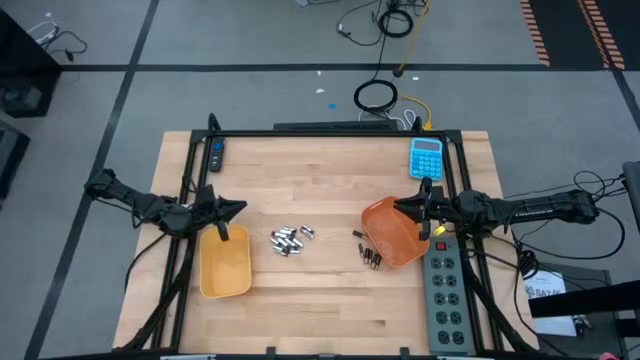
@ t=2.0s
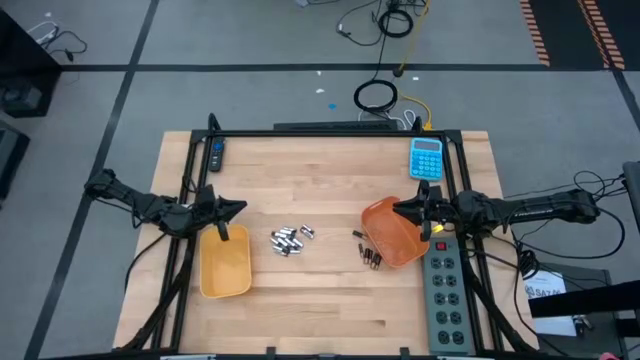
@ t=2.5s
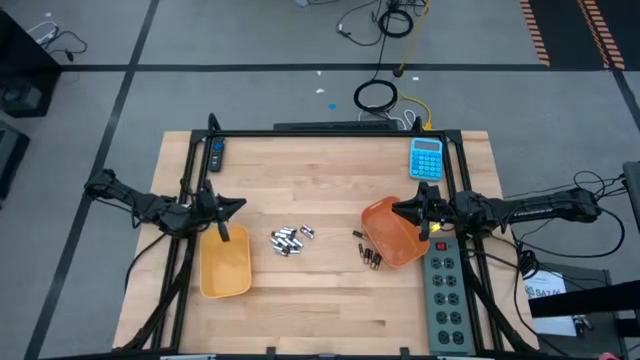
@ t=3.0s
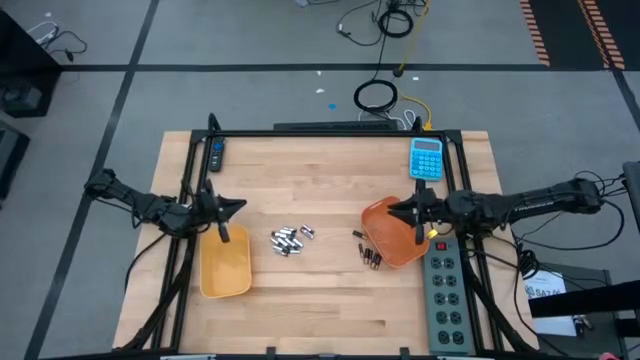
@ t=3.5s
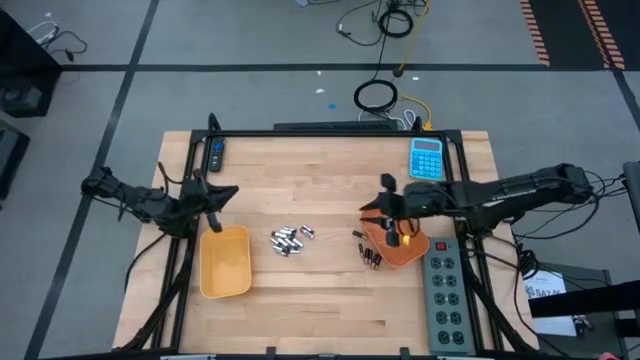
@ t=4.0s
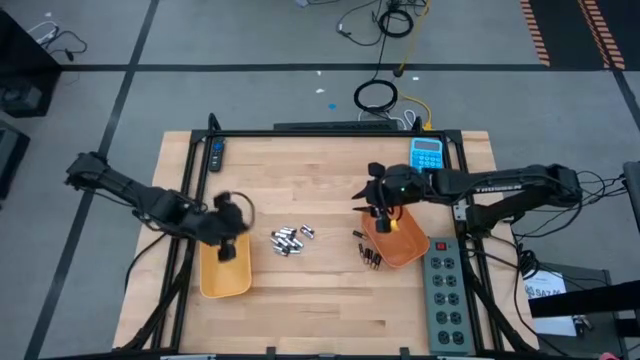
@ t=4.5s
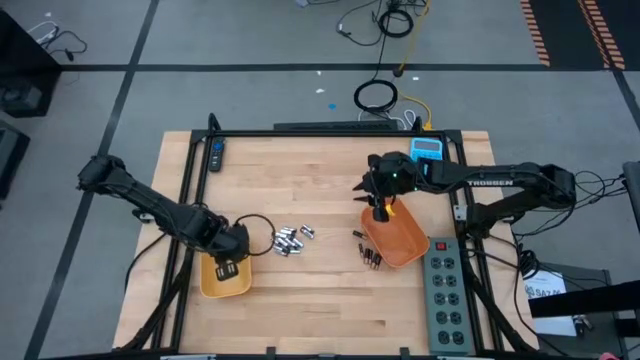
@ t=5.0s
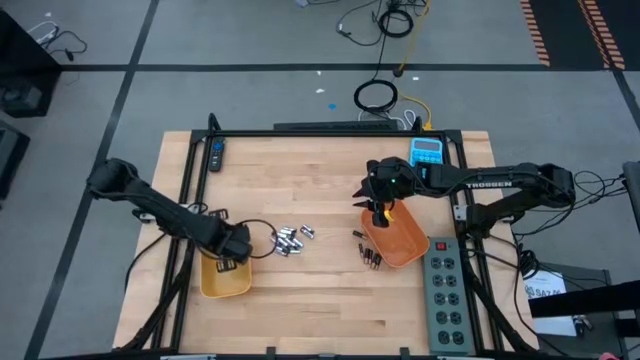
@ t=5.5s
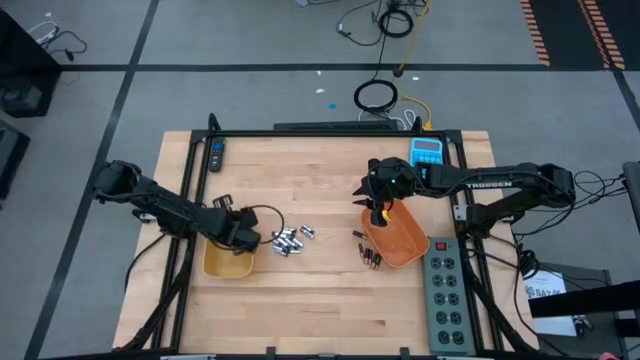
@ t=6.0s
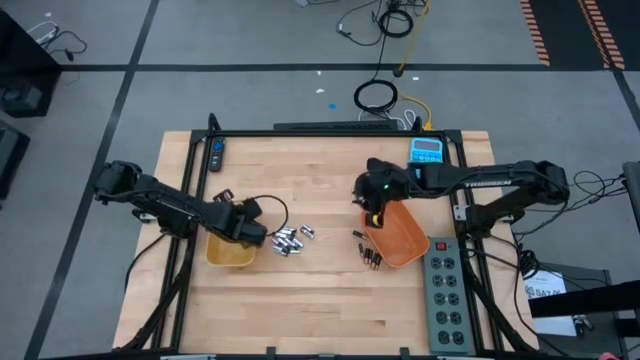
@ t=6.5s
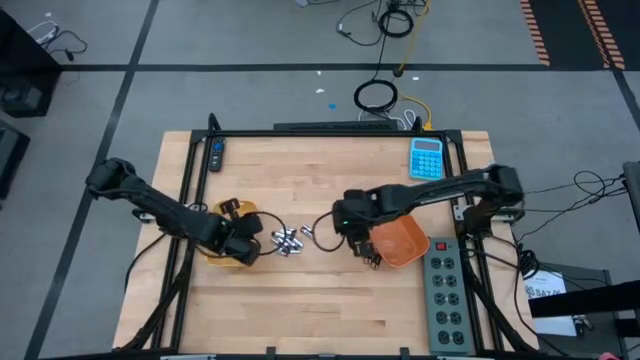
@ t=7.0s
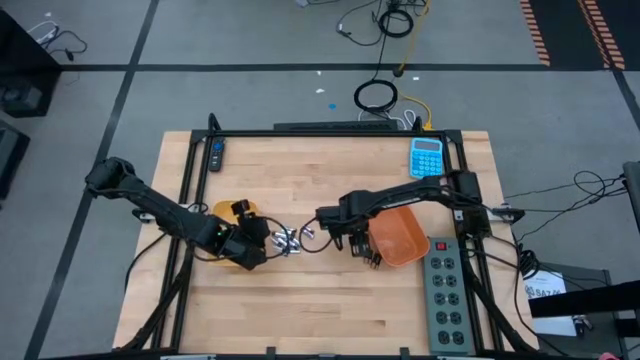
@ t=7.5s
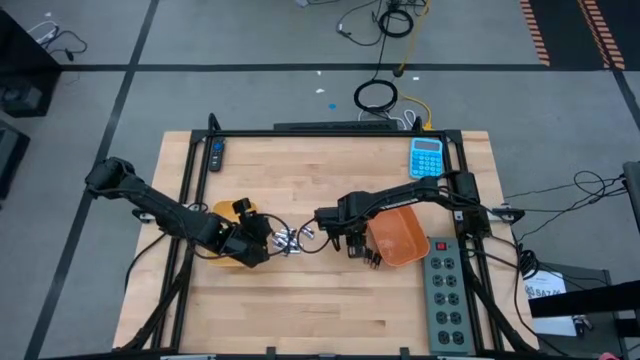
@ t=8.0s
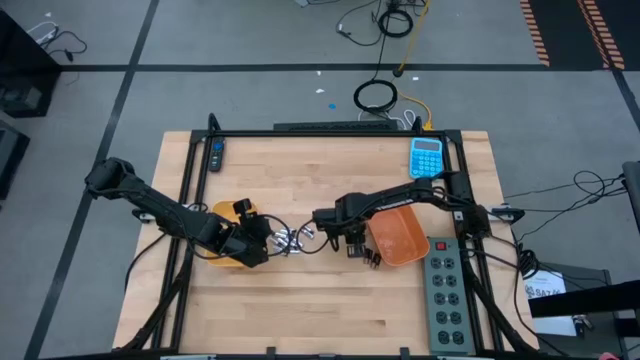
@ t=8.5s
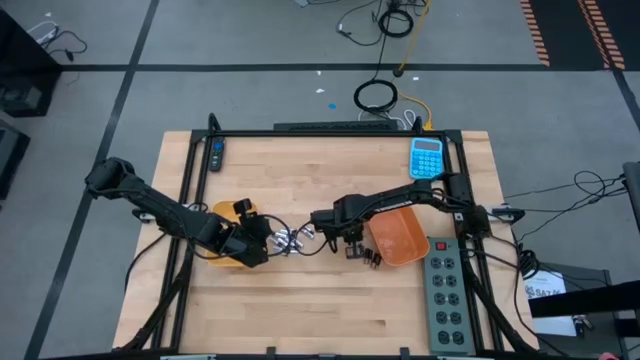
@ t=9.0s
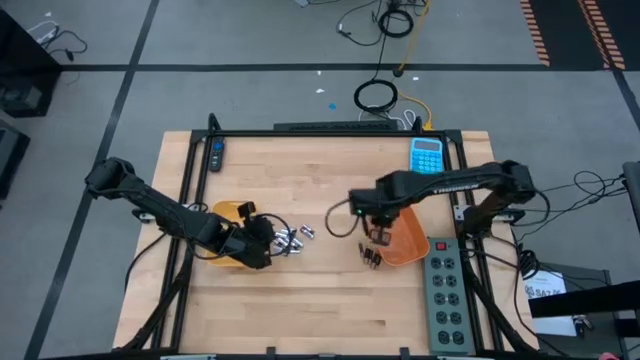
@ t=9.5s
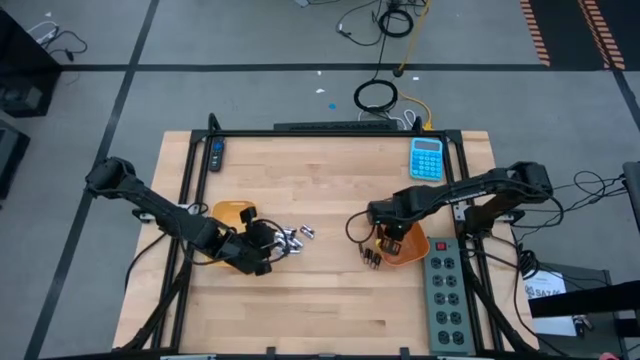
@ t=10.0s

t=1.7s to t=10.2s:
Task: Sort batteries
Put the brown battery into the orange bin

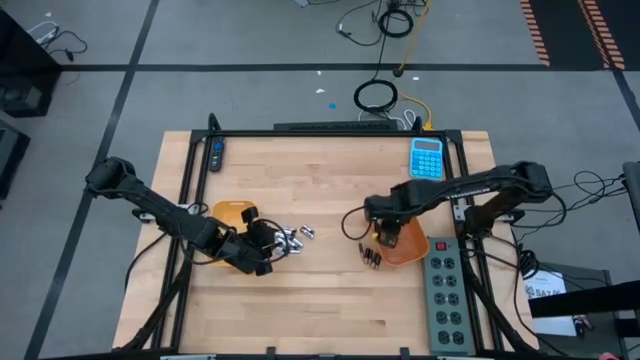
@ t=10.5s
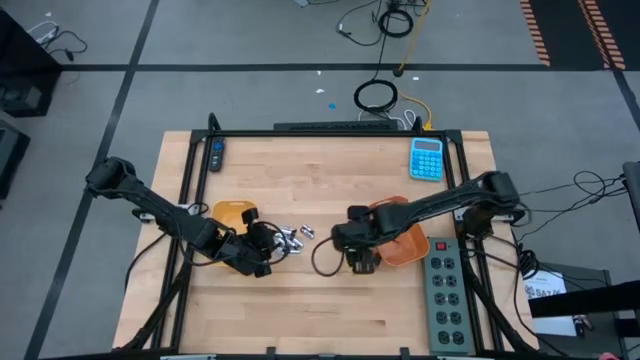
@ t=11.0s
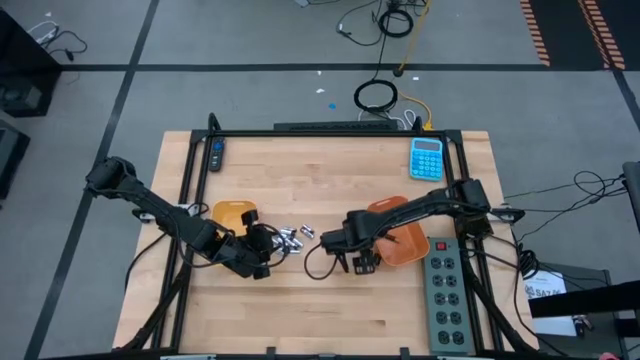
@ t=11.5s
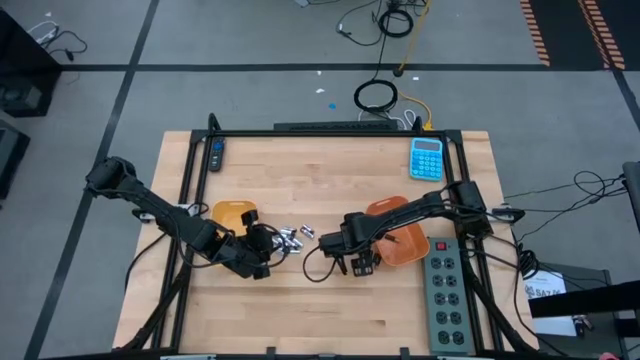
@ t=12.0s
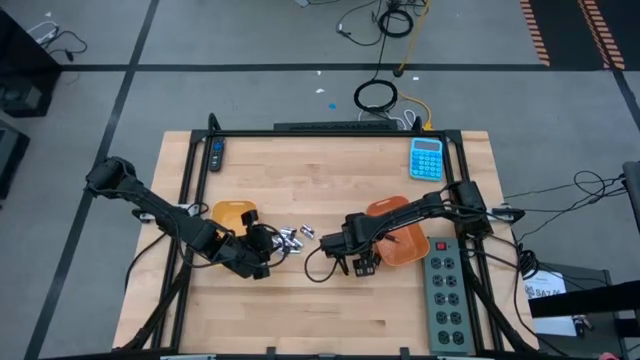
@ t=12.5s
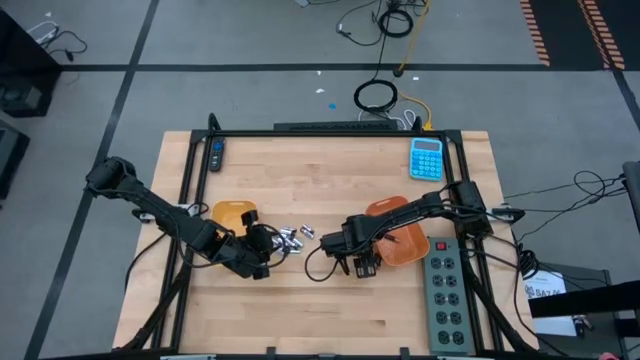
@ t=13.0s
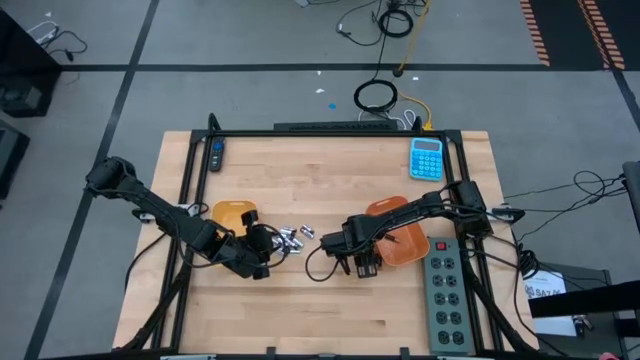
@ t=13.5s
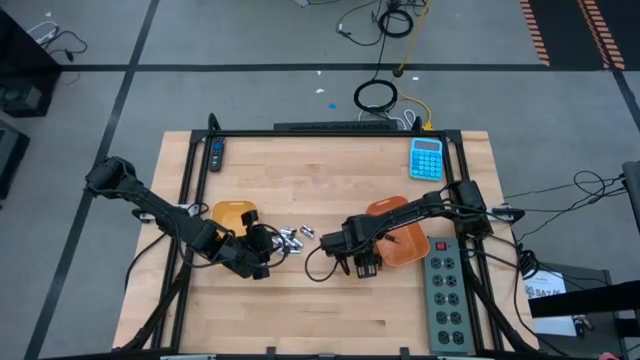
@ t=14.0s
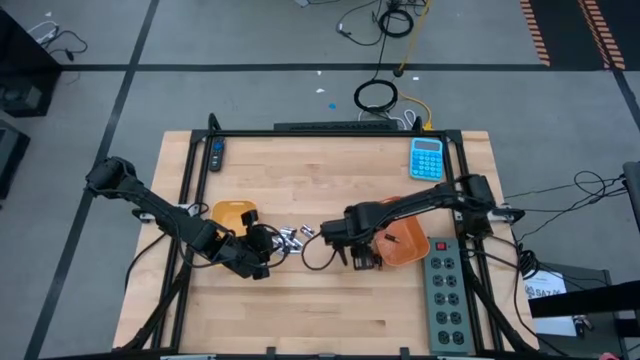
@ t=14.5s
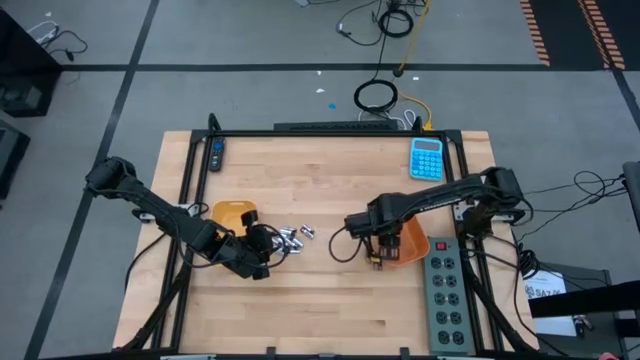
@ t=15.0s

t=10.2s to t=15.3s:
Put the brown battery into the orange bin

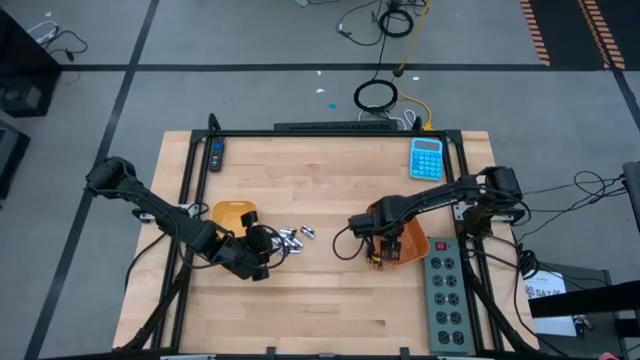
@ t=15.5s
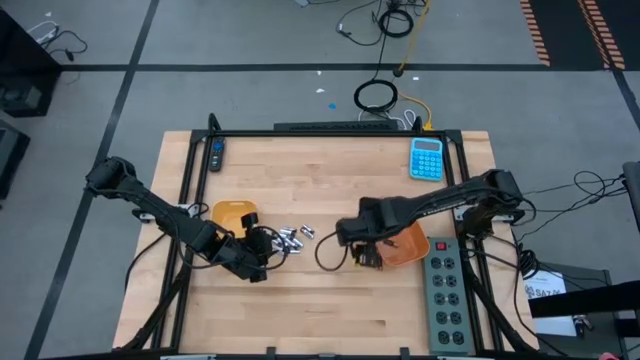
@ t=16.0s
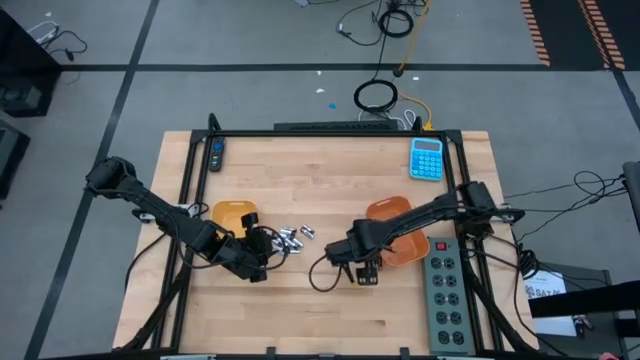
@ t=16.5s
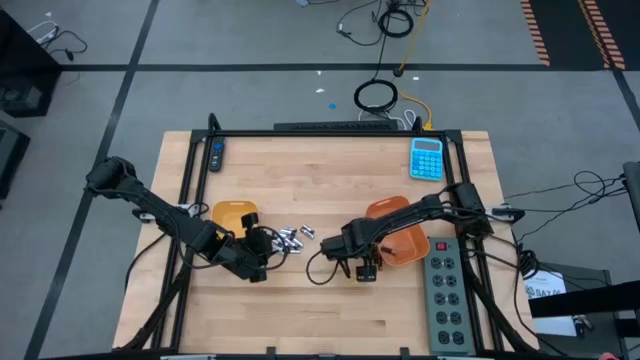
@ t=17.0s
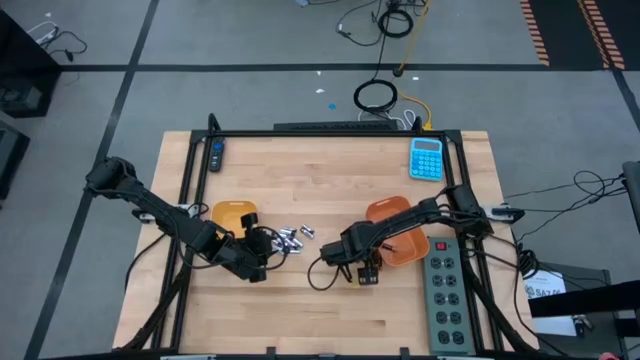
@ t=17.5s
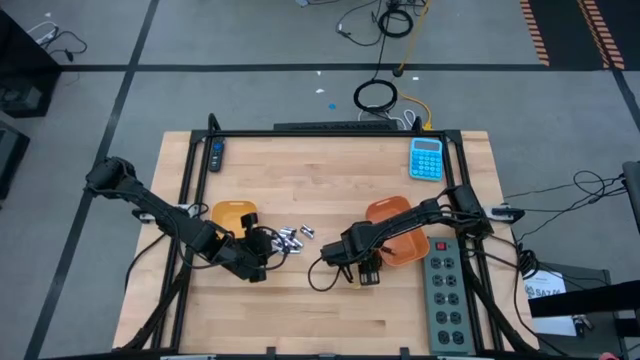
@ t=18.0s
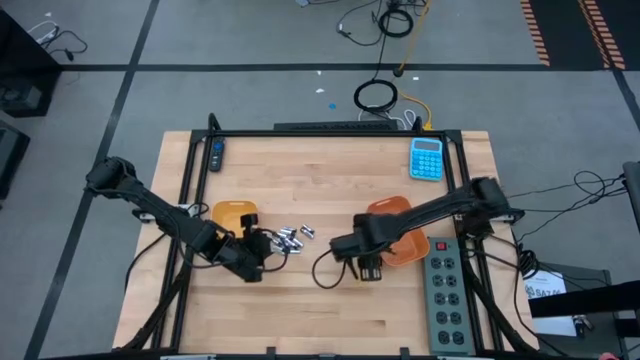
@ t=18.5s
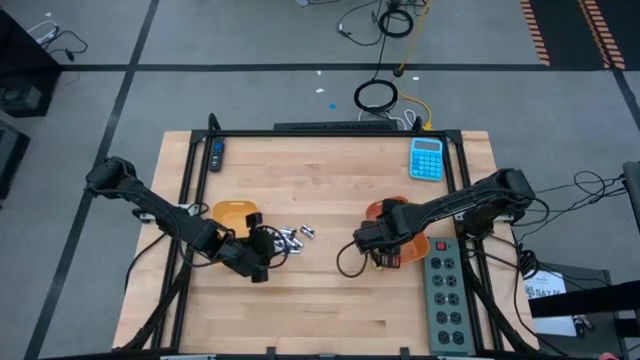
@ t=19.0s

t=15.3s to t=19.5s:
Put the brown battery into the orange bin

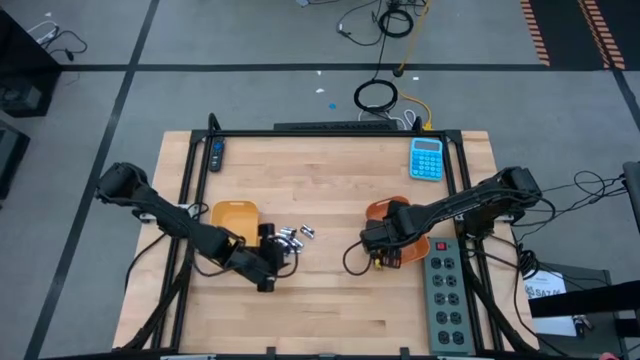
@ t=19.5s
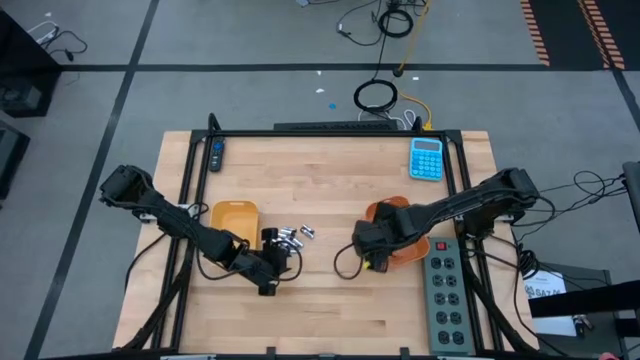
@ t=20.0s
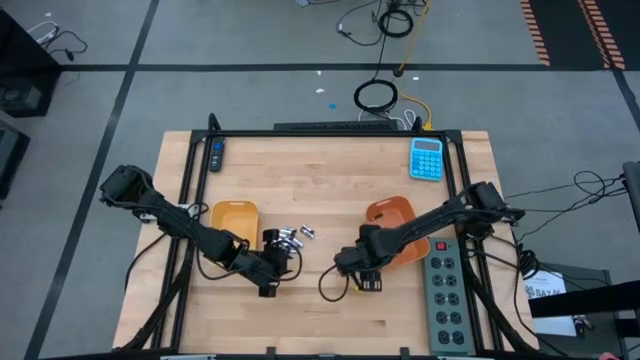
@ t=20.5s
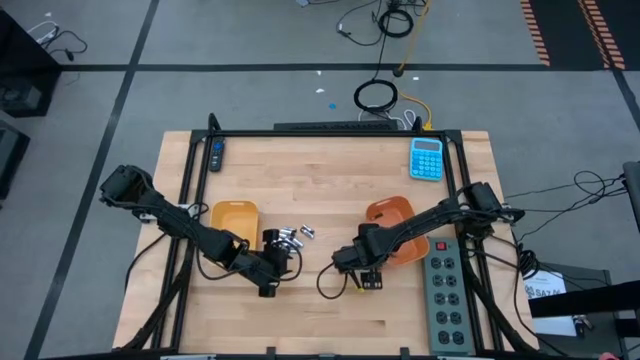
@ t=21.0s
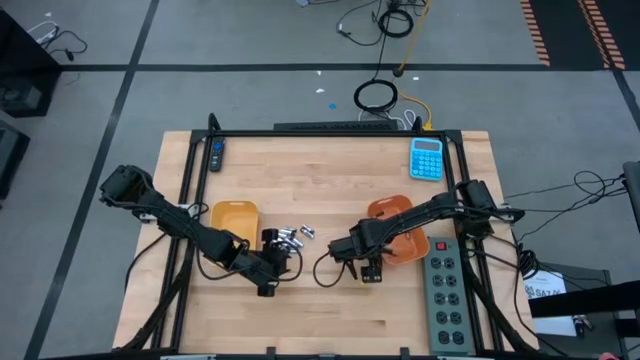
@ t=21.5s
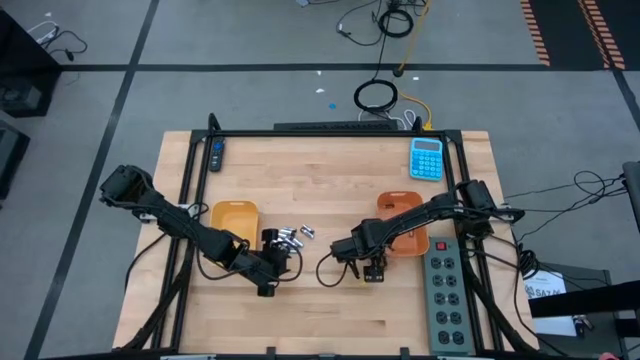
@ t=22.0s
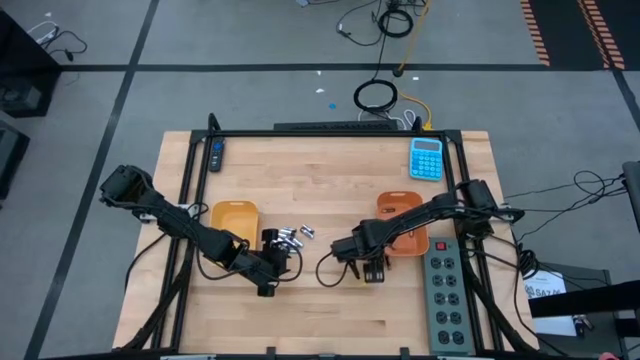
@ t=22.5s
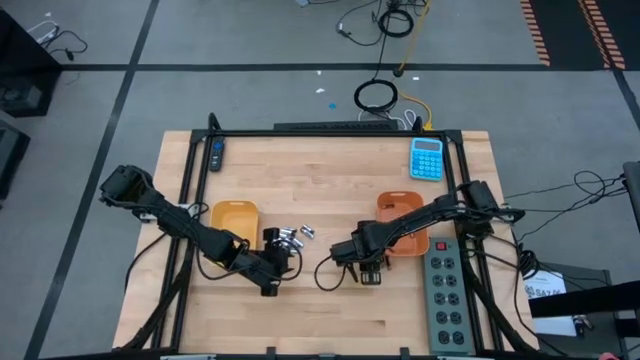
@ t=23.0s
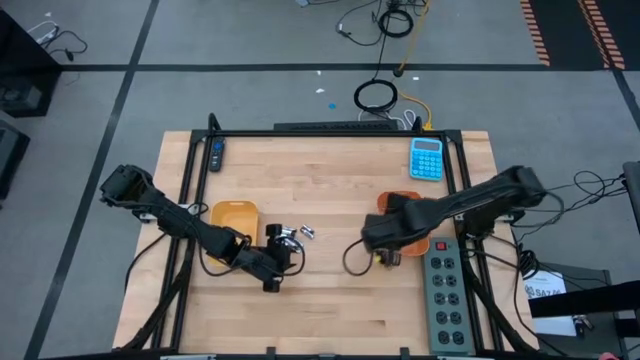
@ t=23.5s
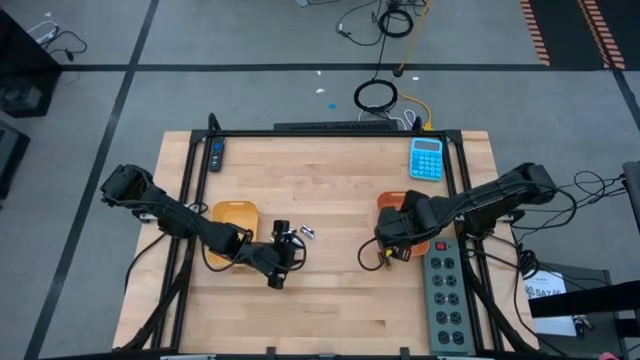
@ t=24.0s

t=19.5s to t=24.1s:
Put the brown battery into the orange bin
